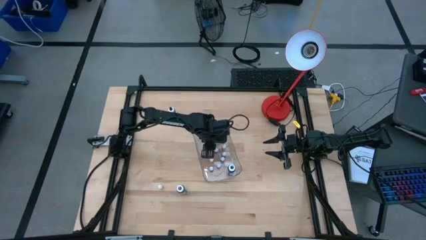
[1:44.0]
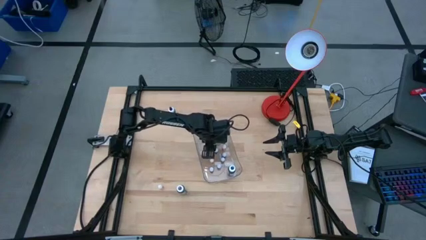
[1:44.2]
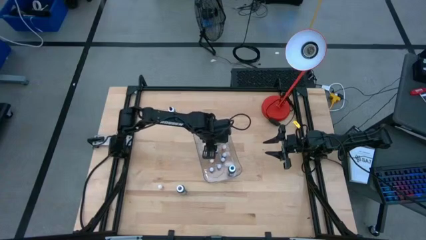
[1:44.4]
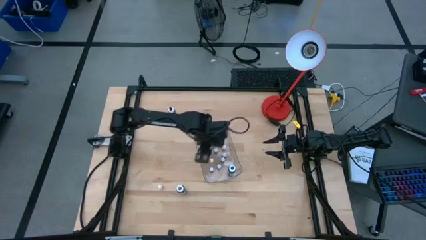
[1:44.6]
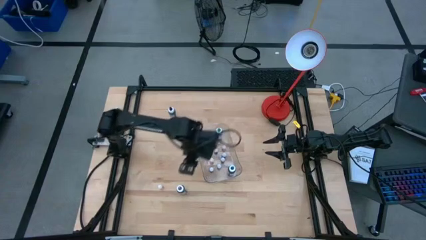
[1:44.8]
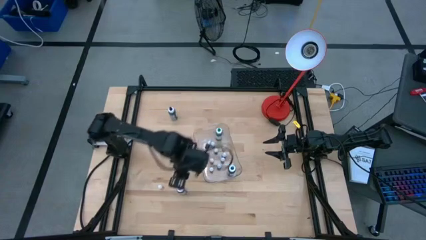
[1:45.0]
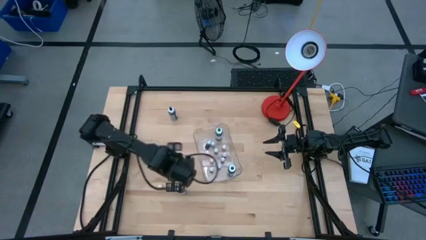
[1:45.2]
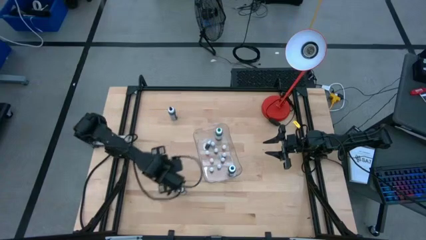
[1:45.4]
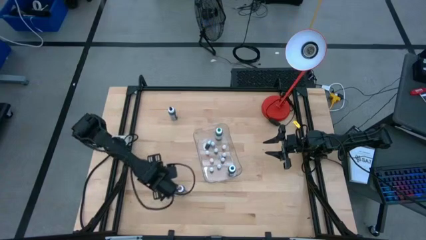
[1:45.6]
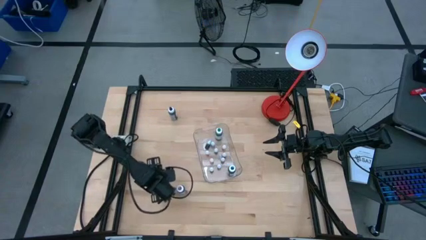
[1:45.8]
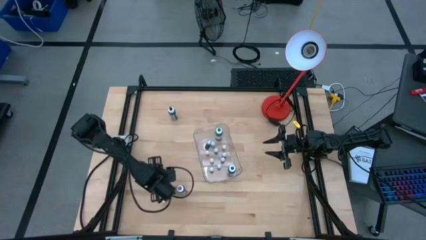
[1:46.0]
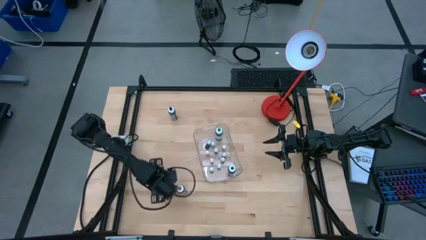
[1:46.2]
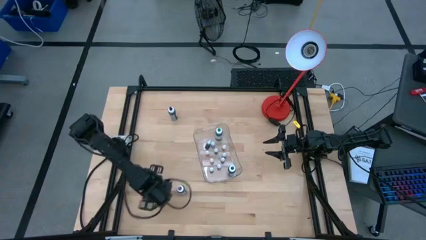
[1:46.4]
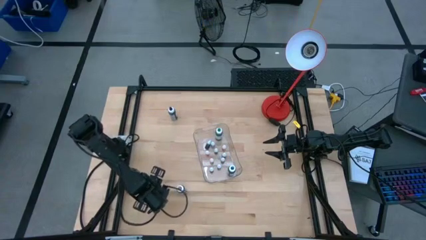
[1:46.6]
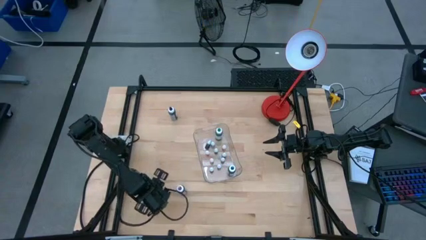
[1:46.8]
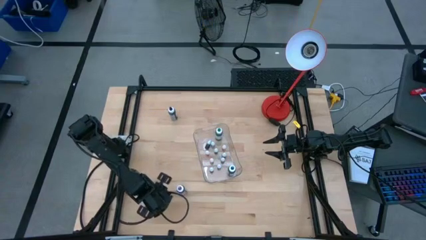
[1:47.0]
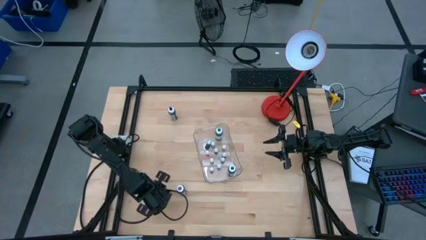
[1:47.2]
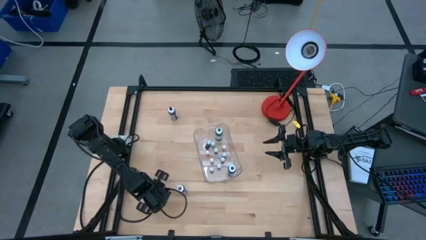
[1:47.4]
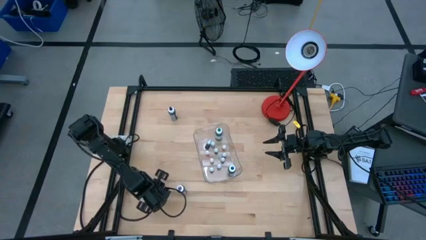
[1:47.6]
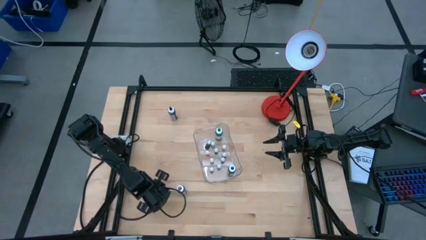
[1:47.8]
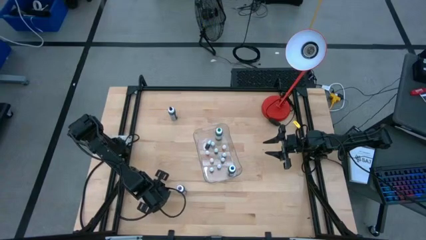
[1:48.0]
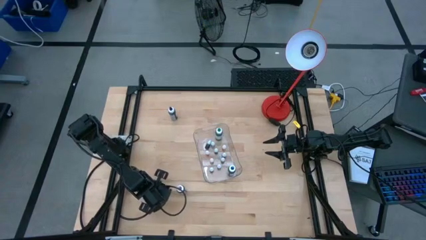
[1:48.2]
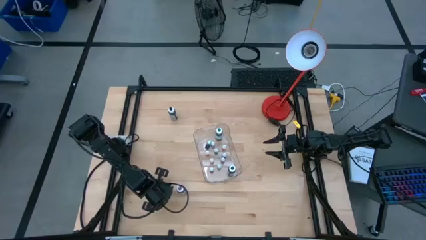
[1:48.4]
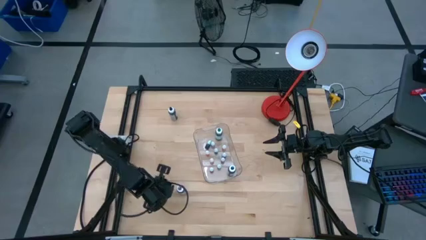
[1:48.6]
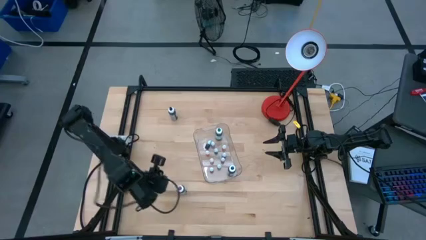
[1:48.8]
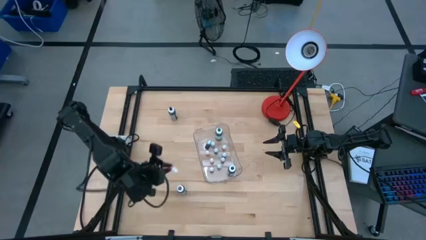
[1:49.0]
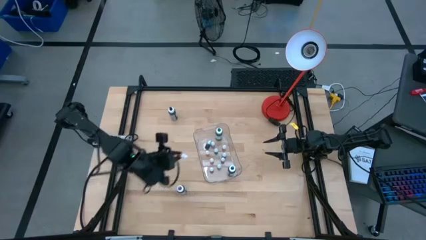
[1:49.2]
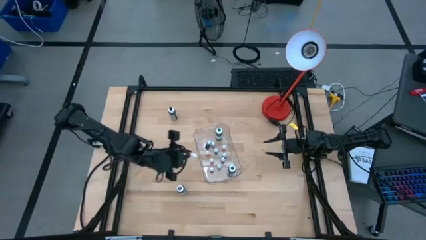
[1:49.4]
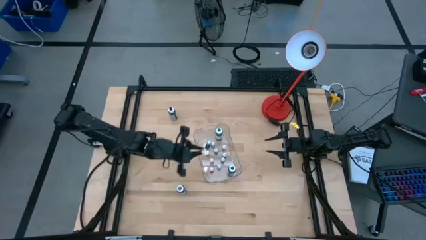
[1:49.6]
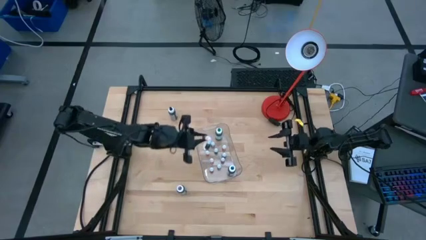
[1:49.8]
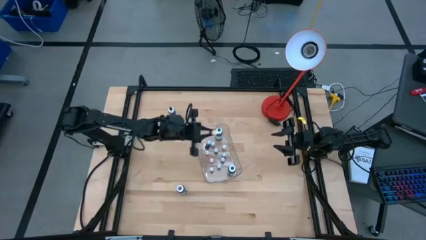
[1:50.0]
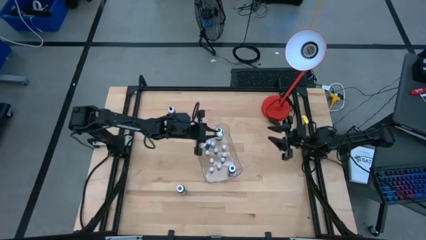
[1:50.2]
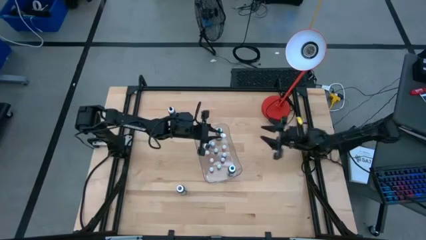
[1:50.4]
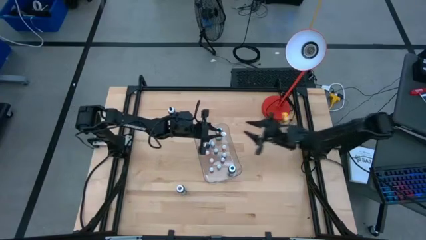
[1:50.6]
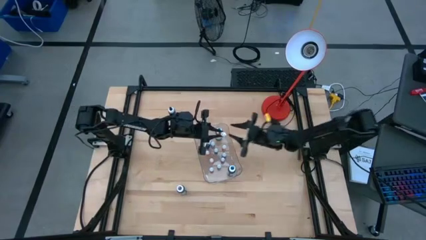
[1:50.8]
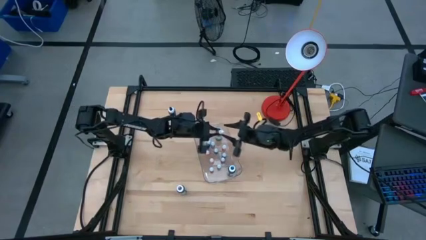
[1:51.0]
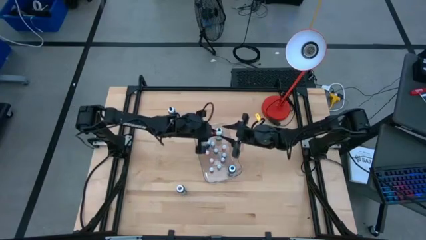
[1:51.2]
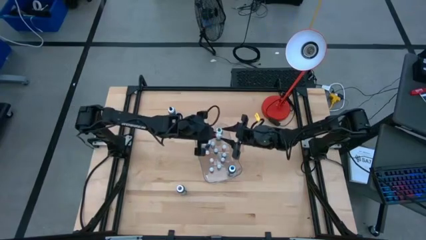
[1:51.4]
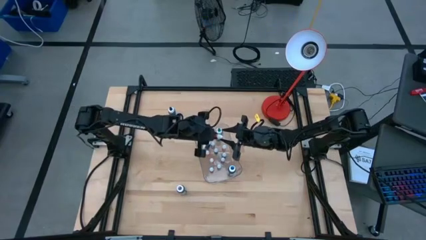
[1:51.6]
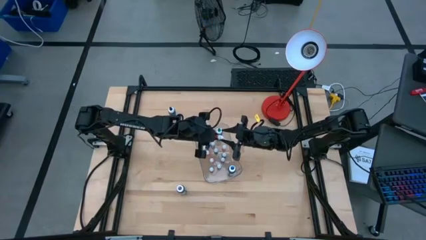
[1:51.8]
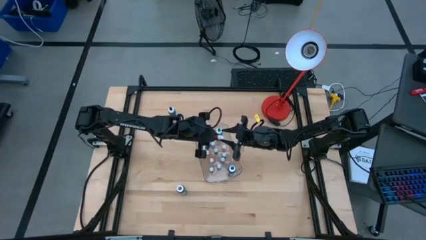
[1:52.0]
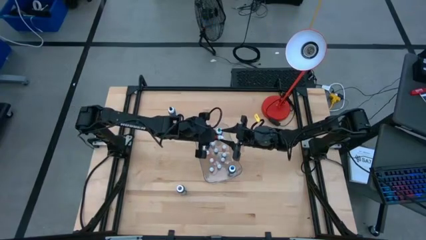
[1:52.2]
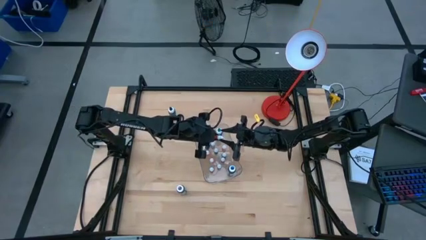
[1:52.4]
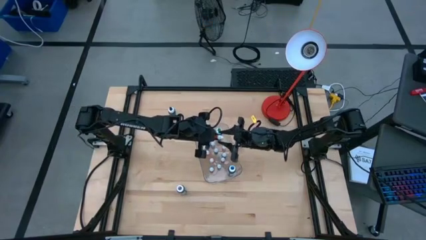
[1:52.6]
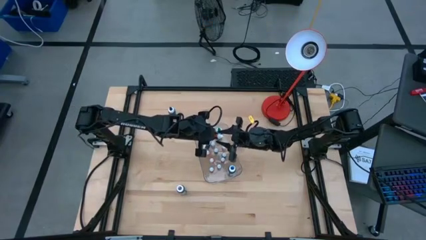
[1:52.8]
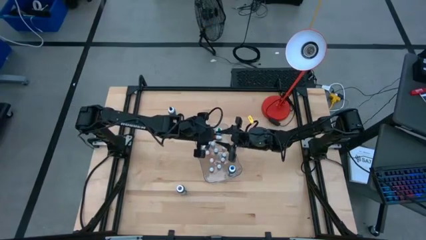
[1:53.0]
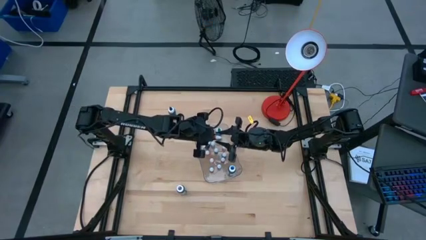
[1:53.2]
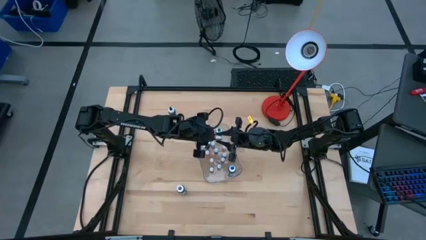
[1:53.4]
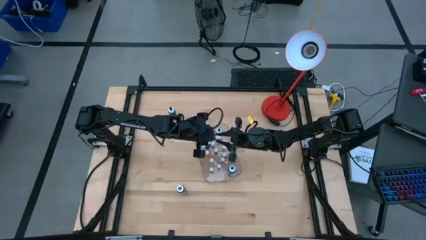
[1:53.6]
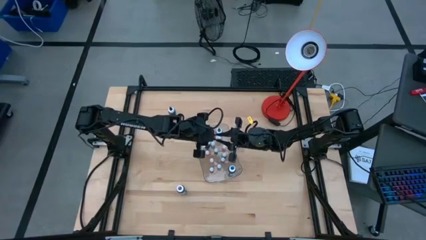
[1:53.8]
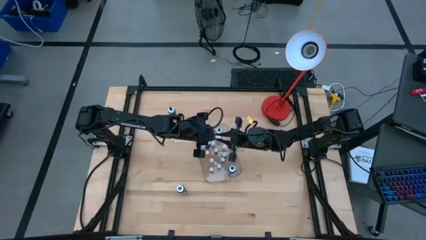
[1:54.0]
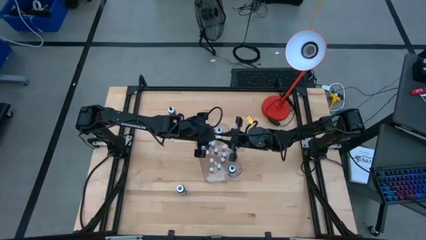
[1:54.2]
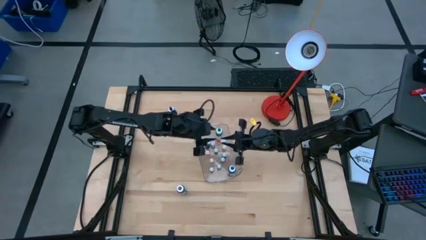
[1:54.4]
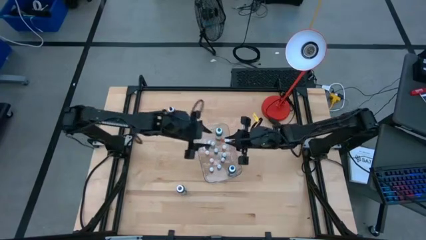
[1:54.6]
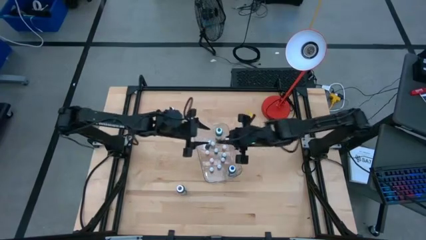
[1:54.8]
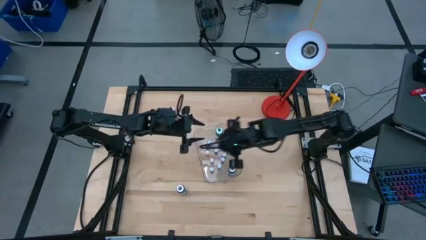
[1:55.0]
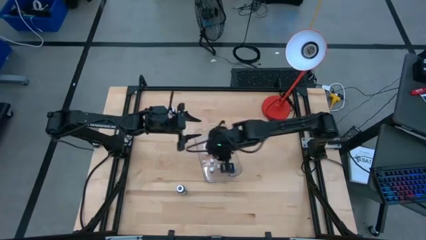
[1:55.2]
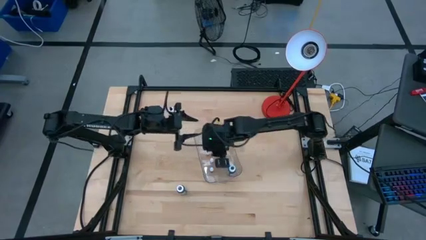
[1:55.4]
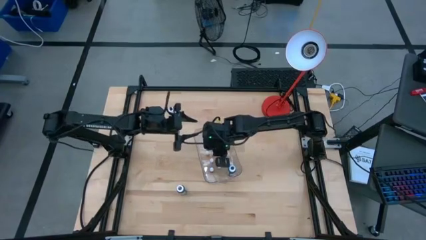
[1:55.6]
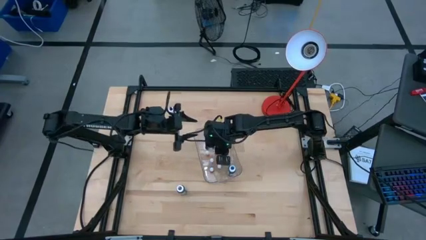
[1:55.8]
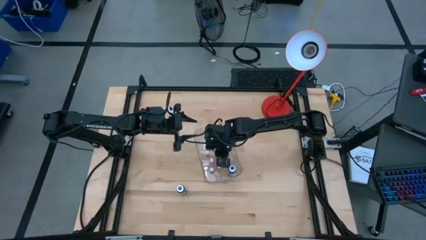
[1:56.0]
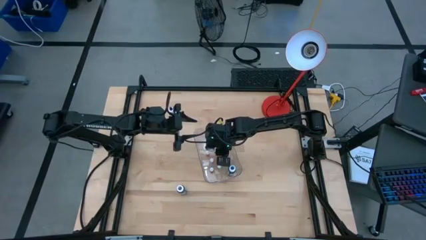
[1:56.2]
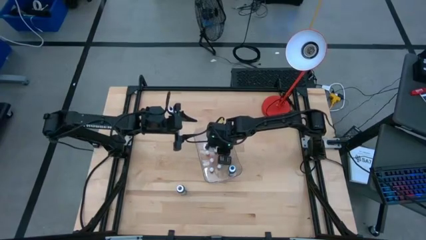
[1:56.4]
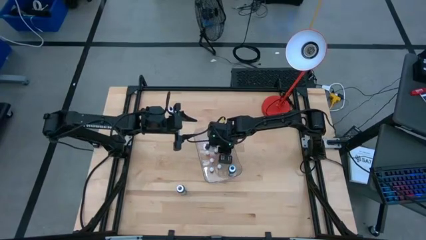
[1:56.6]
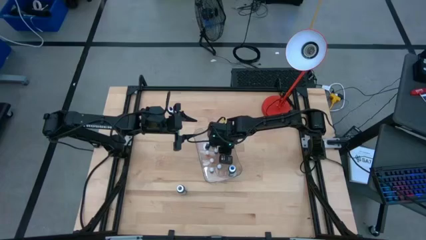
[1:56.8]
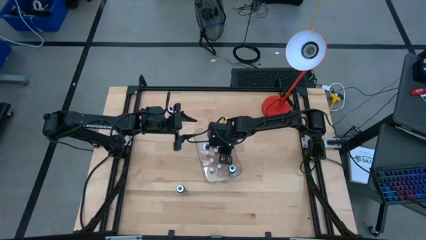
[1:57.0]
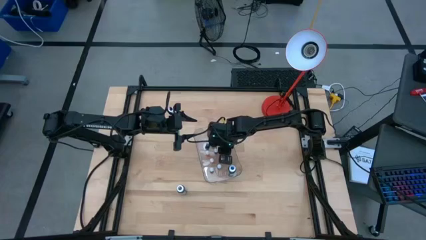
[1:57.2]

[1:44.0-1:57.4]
Task: Pick & Place food coloring
Put the small yellow food coloring bottle into the transparent bin

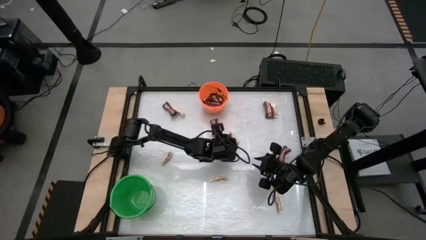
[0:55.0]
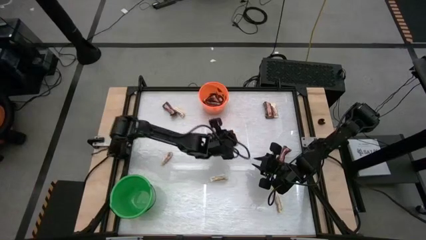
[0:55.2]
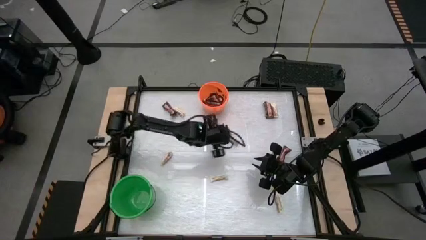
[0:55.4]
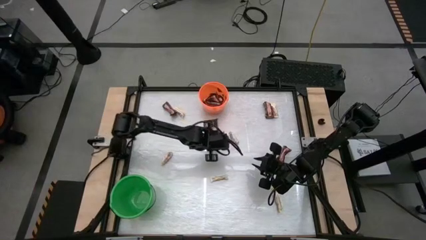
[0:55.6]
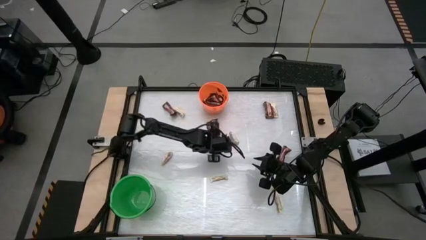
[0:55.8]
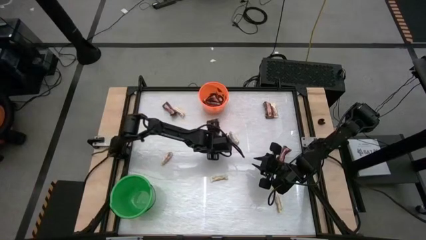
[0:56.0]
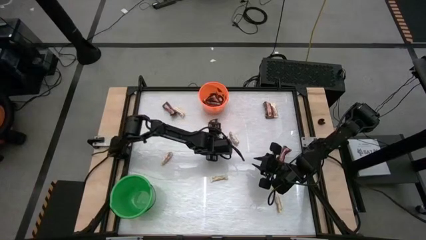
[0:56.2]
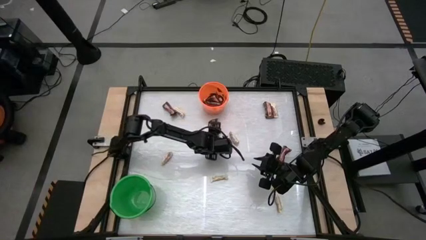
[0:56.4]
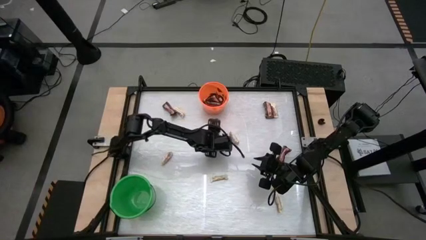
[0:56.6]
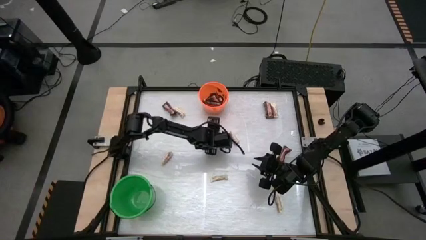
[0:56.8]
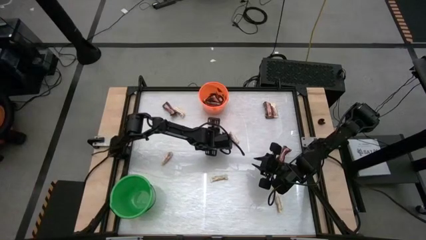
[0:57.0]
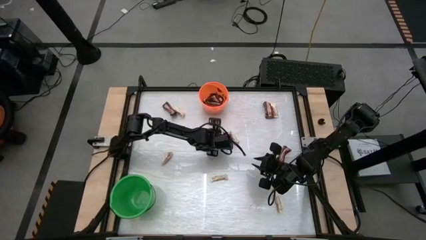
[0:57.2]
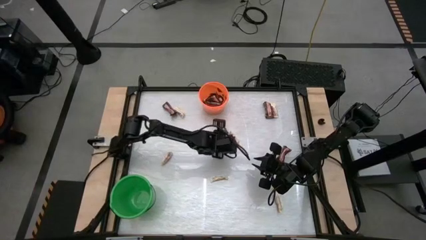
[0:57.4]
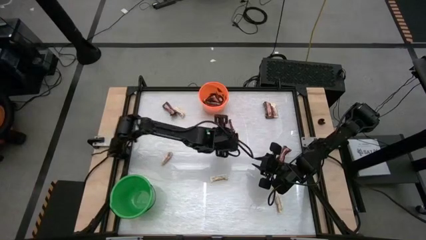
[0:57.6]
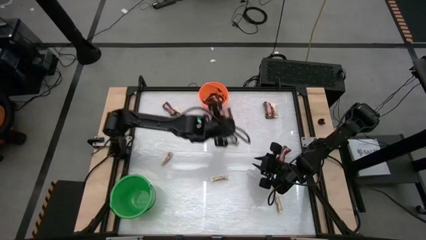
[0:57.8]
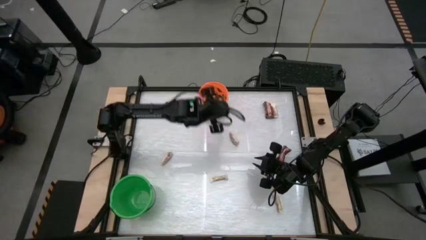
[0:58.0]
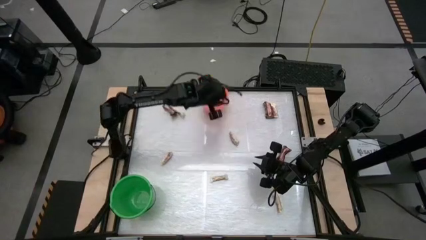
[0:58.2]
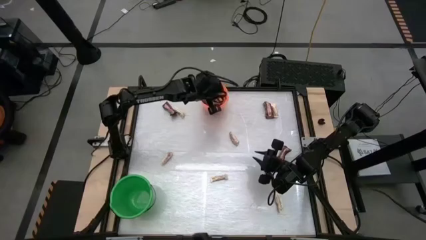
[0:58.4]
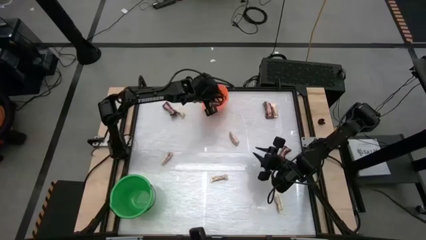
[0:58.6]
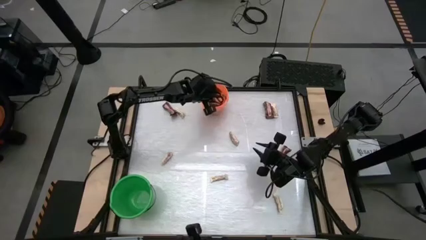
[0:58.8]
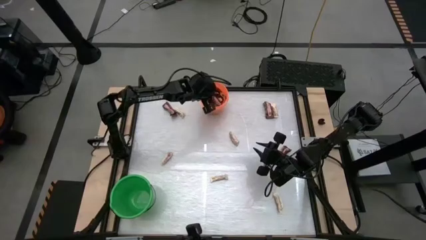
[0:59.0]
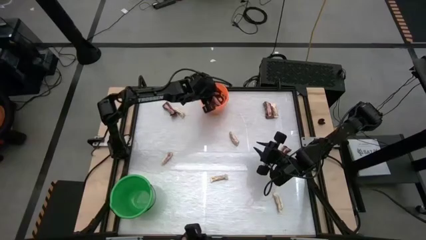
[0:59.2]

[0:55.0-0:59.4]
Task: Sort candy by brand, put in halloween buckets
Put the brown chocolate bar into the orange bucket
